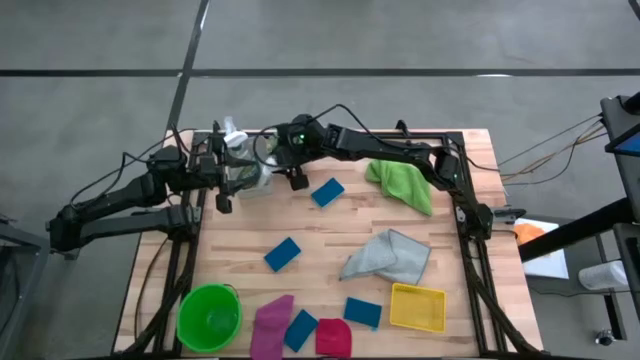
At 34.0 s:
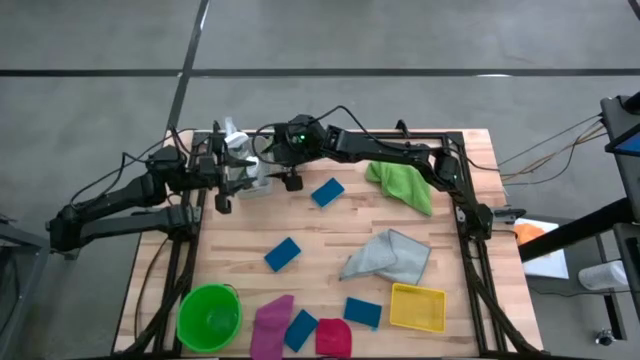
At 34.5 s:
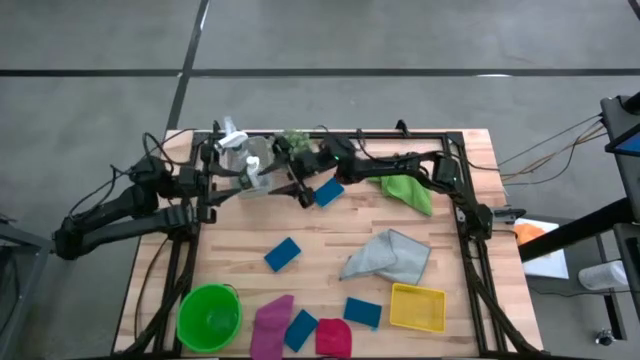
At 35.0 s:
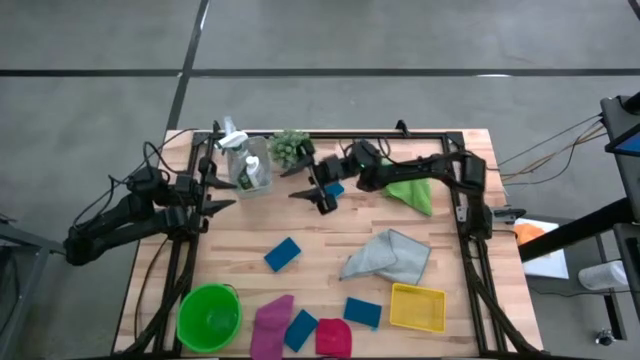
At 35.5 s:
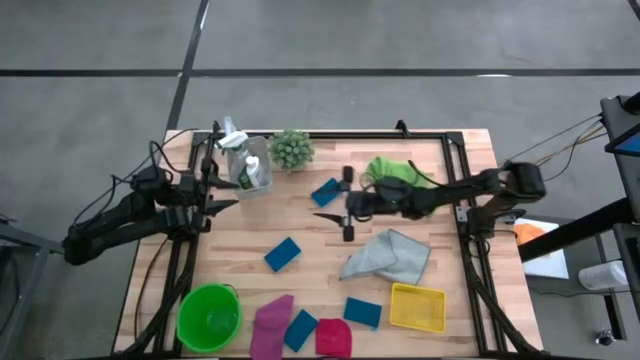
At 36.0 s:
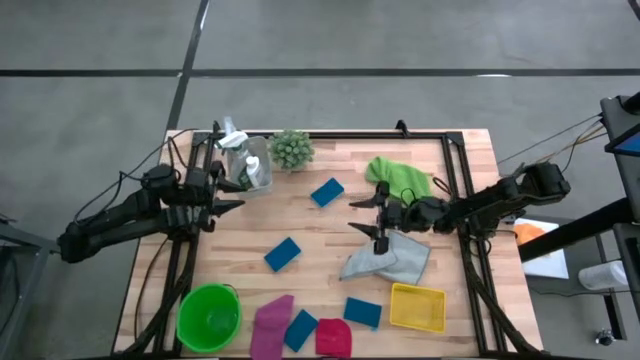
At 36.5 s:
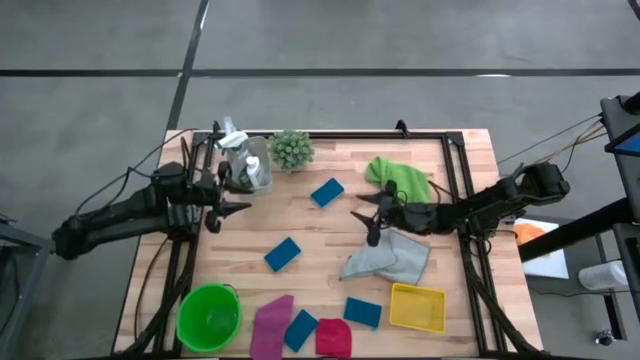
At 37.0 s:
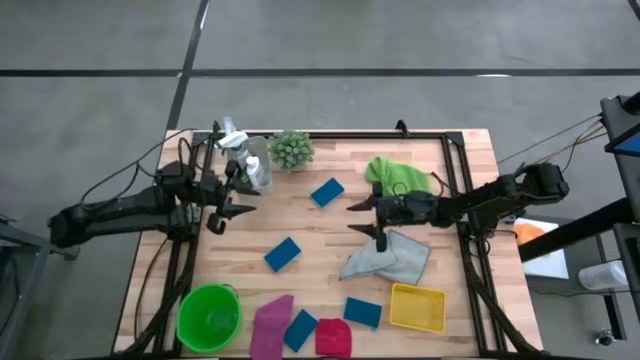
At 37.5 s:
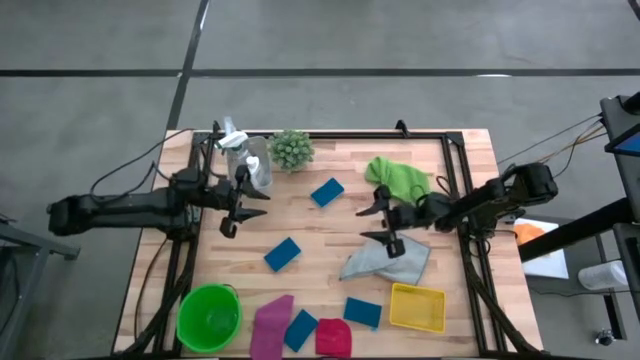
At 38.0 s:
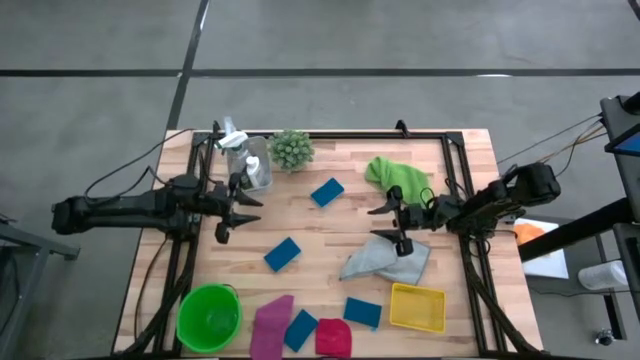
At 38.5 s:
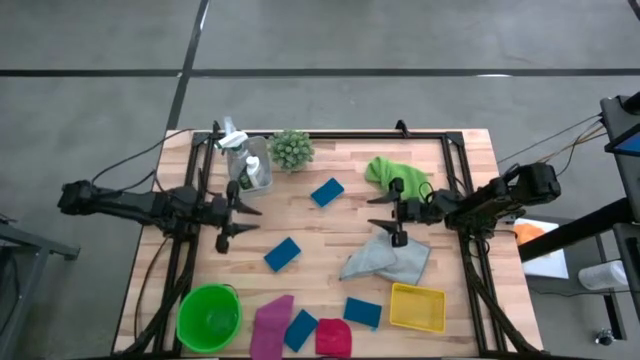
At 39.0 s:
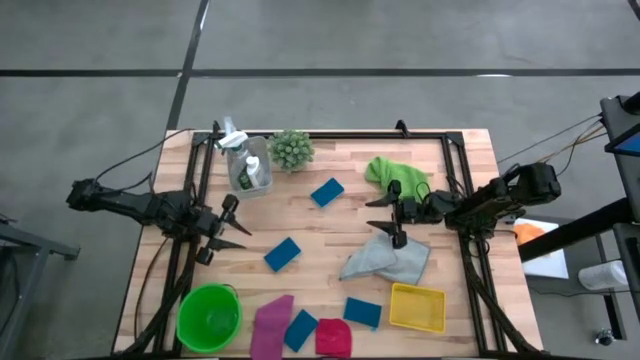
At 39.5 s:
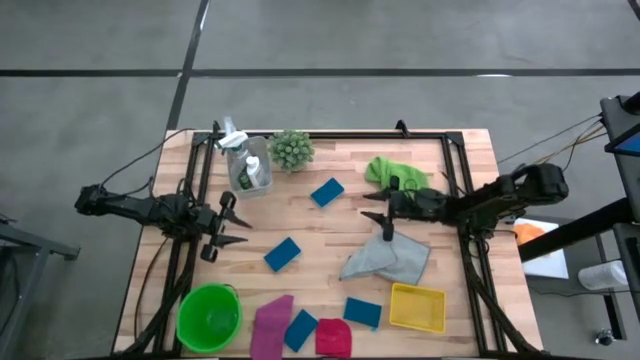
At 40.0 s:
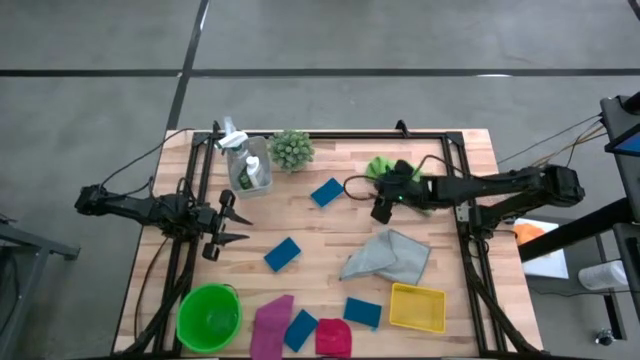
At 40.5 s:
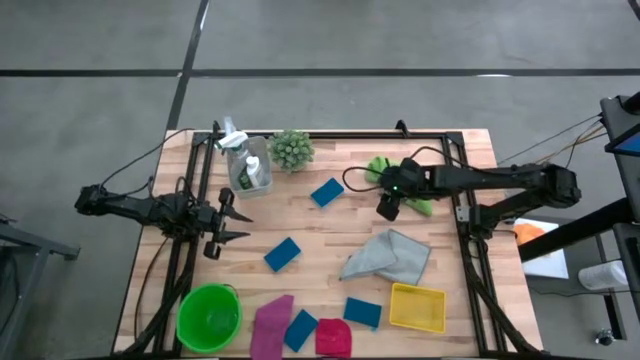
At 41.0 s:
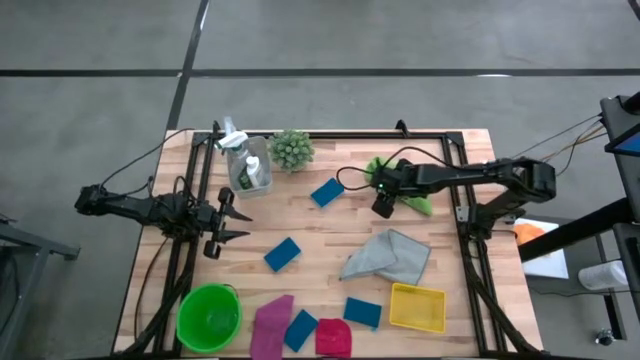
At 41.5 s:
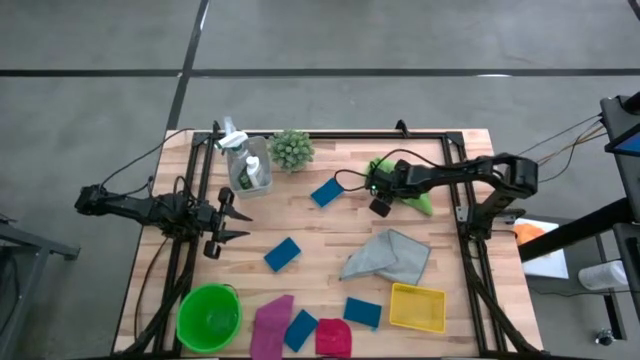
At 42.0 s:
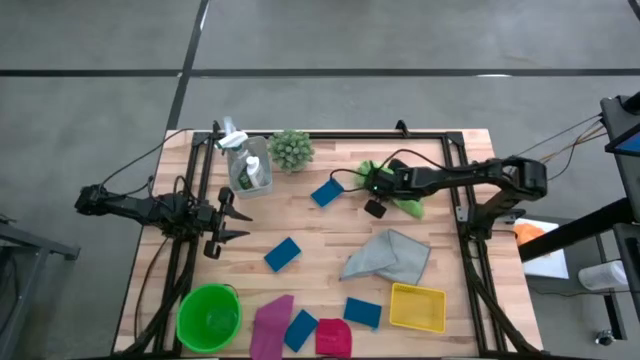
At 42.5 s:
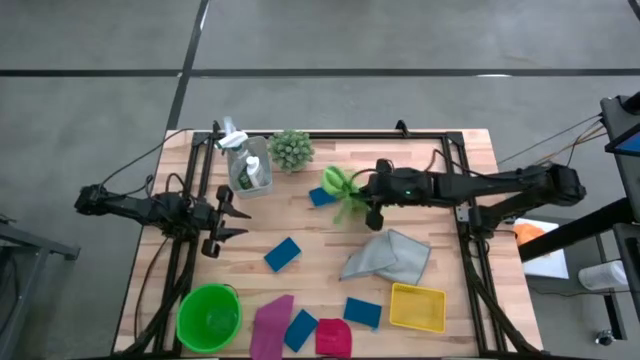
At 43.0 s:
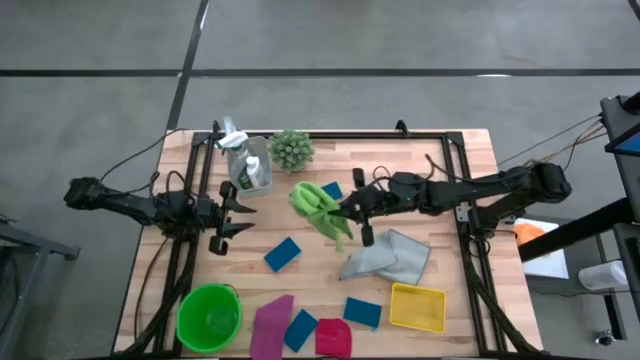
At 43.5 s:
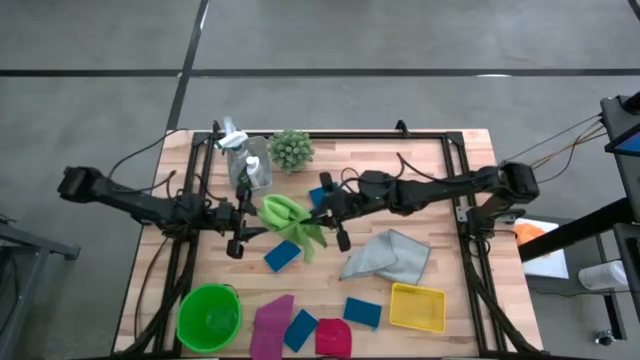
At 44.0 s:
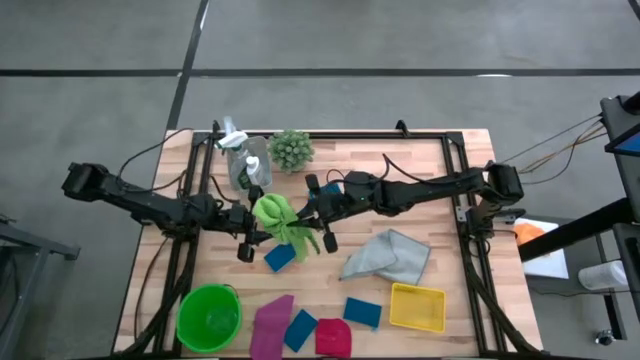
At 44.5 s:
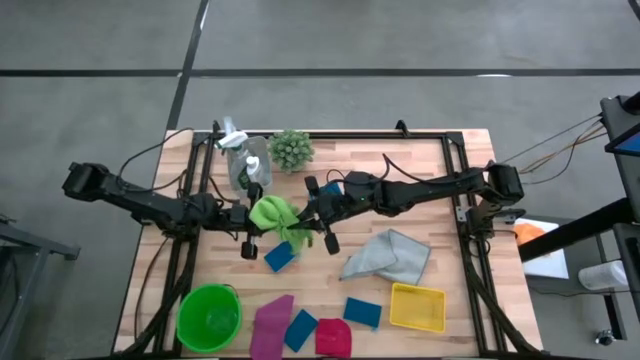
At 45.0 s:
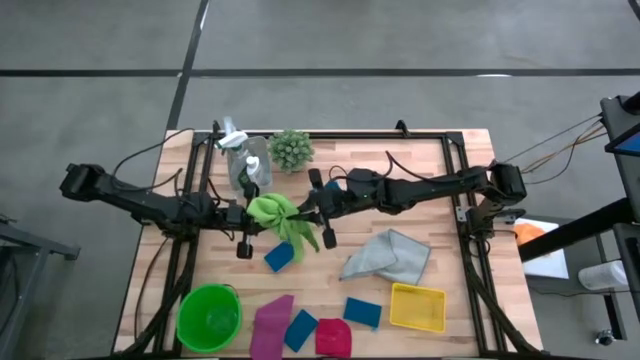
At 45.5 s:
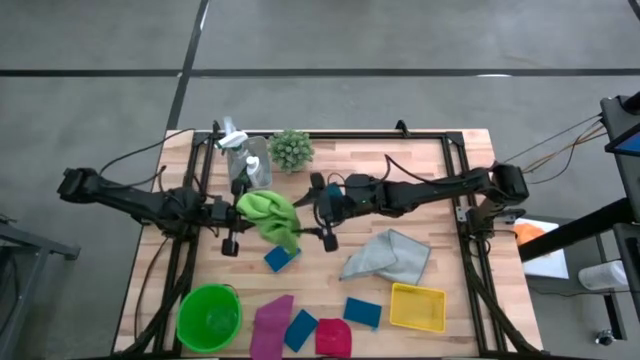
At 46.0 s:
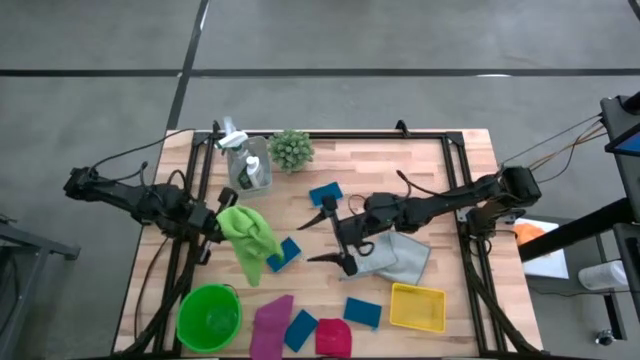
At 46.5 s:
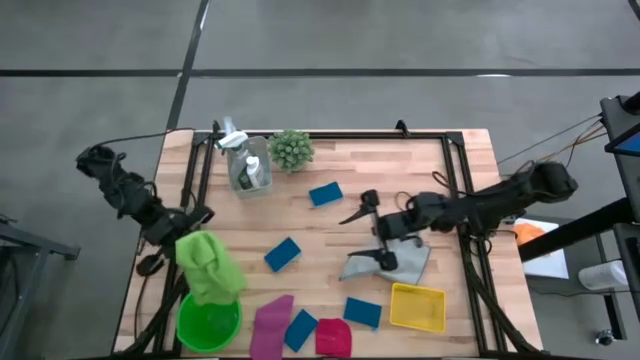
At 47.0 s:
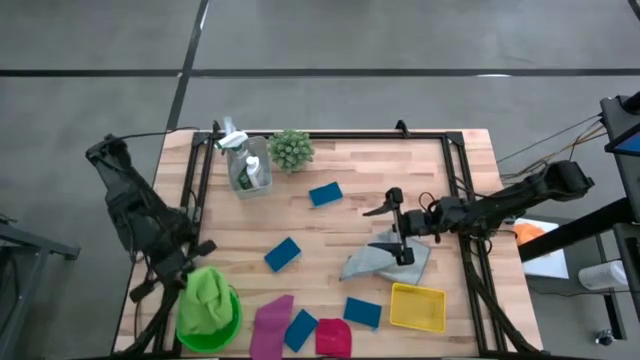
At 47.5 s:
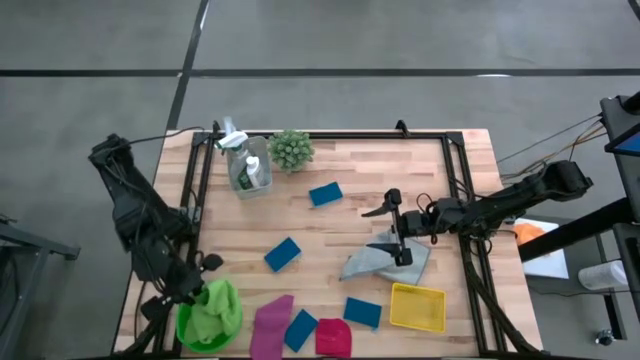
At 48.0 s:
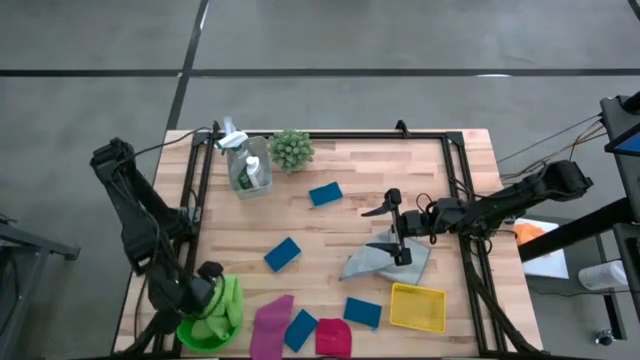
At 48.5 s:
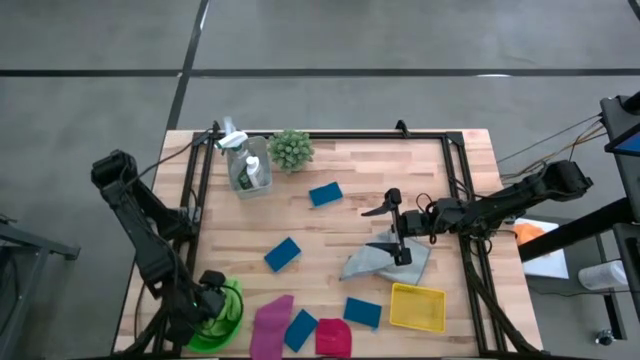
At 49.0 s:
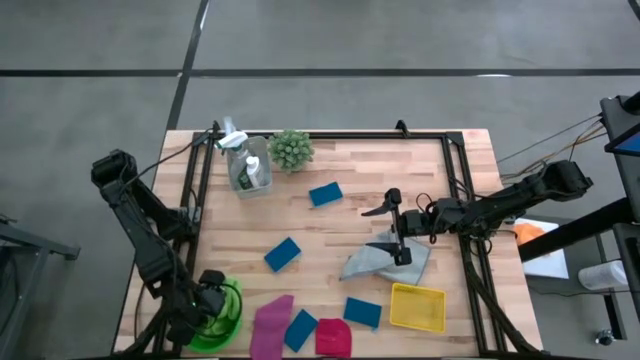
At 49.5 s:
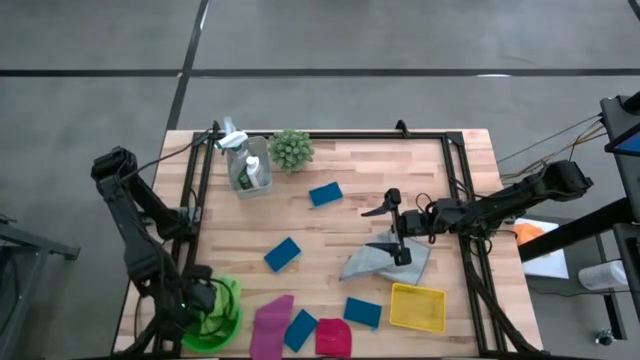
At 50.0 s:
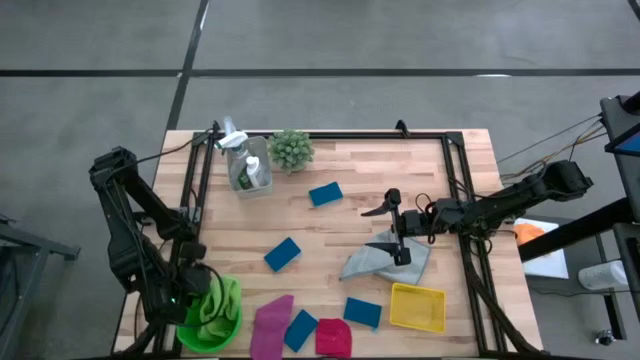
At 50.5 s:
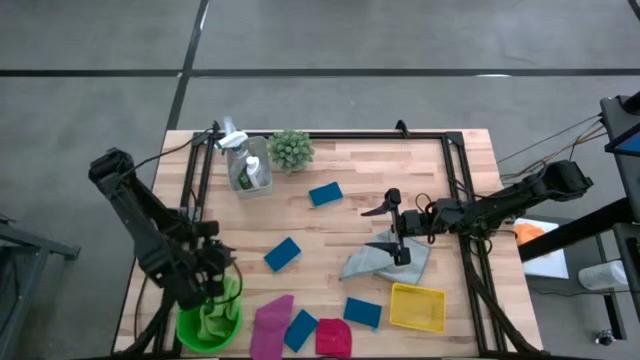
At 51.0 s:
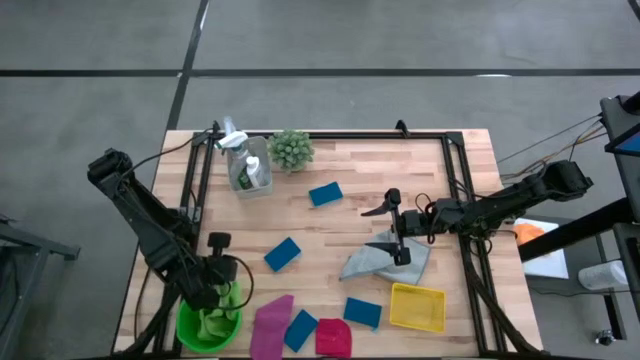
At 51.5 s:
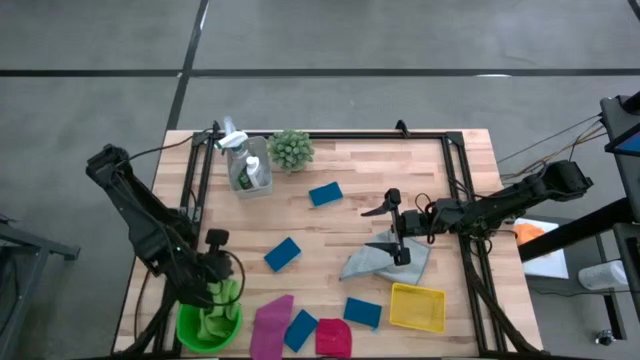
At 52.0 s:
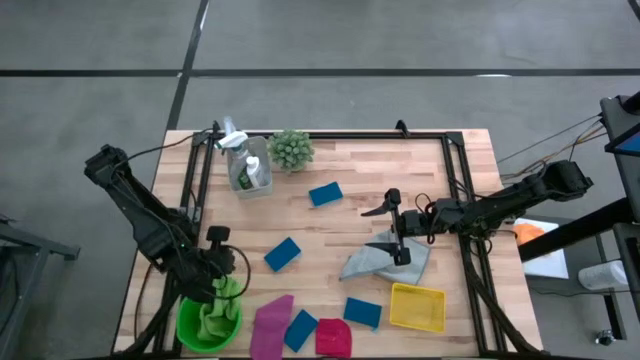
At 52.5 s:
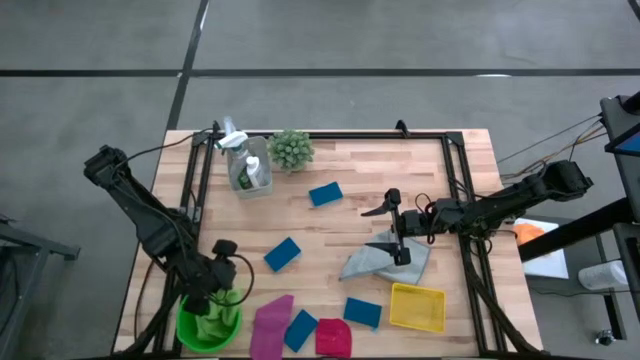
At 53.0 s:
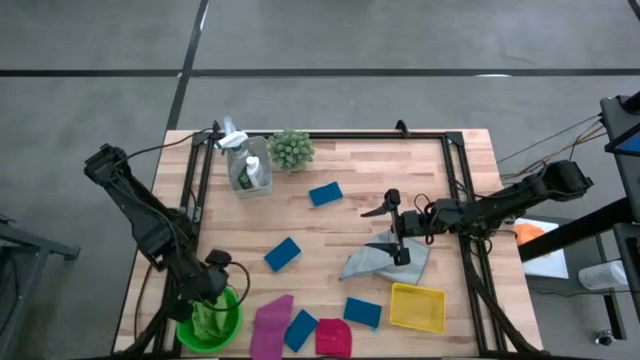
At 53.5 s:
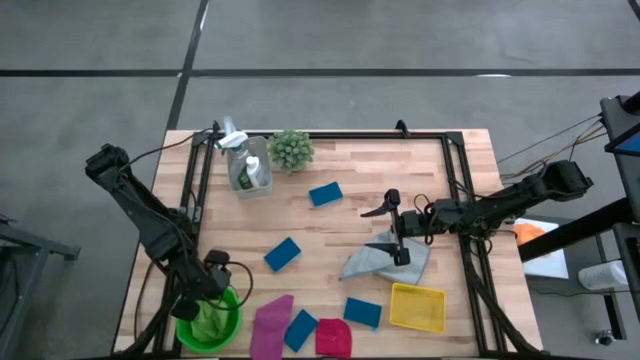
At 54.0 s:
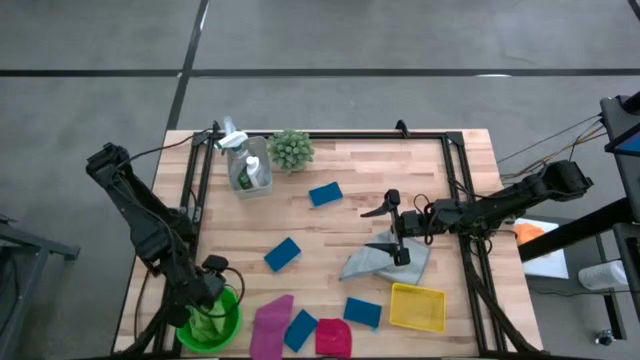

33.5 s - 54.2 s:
Task: Pick & Place Kitchen Items
Put the green towel into the green bucket
